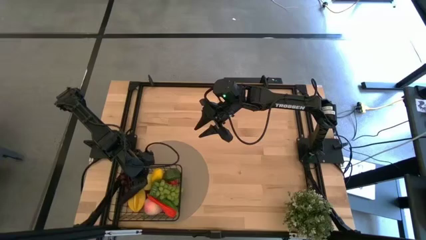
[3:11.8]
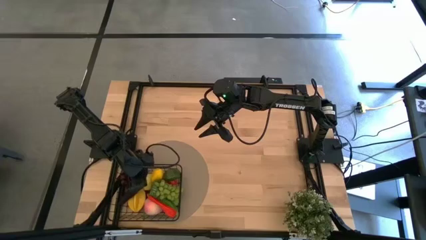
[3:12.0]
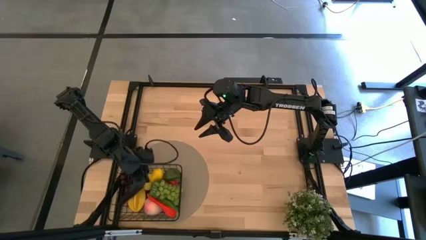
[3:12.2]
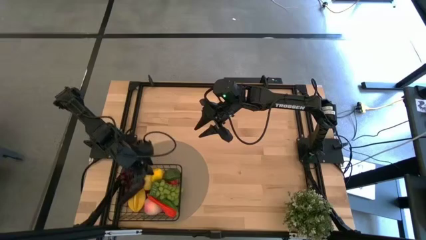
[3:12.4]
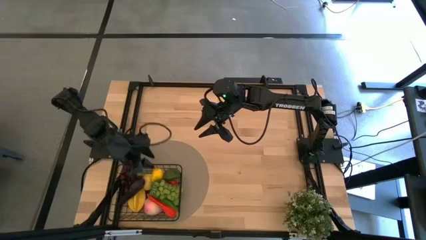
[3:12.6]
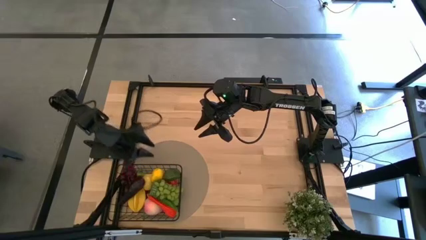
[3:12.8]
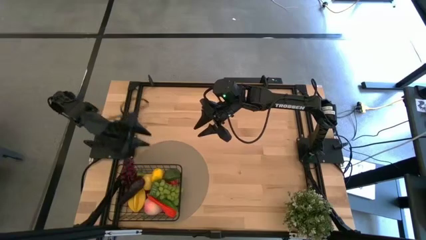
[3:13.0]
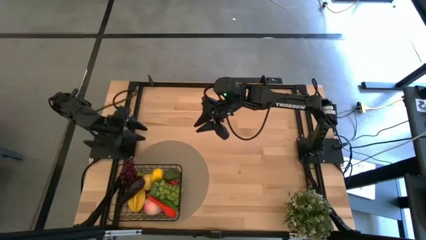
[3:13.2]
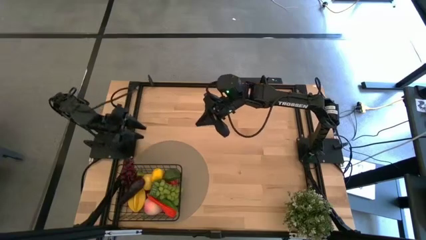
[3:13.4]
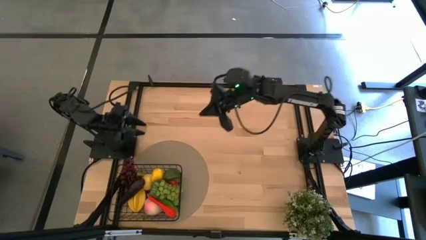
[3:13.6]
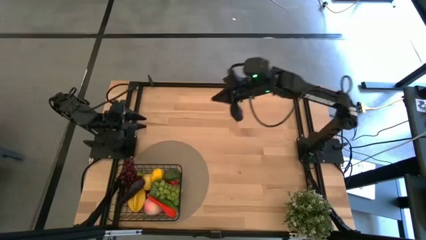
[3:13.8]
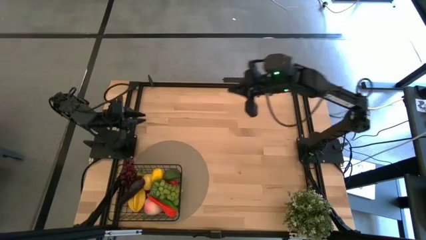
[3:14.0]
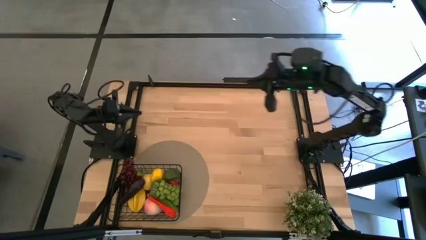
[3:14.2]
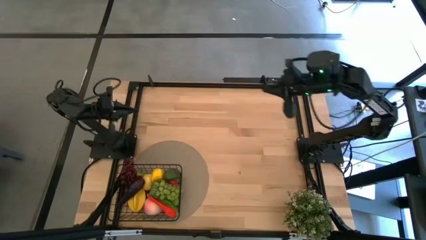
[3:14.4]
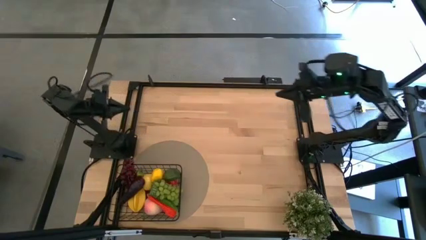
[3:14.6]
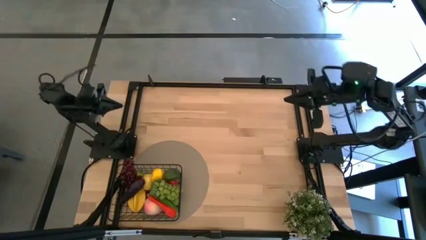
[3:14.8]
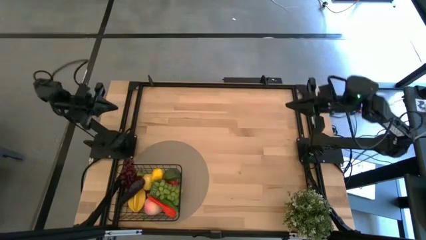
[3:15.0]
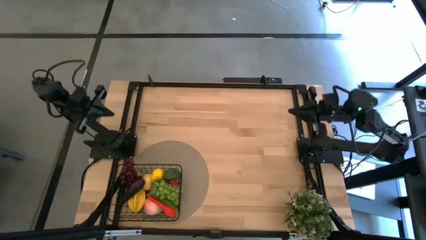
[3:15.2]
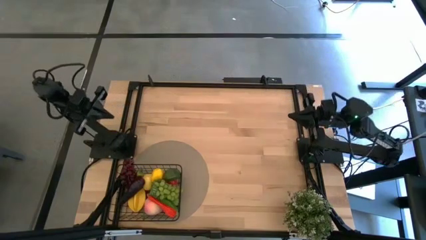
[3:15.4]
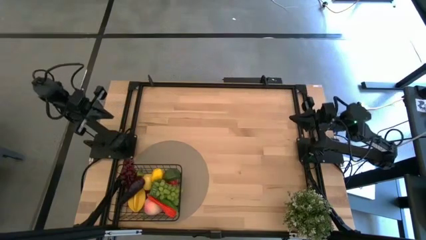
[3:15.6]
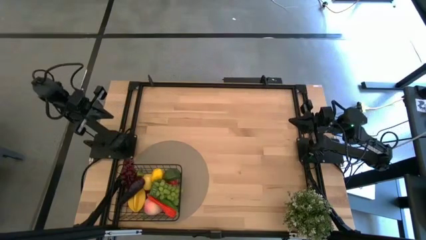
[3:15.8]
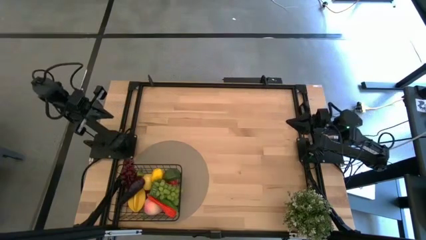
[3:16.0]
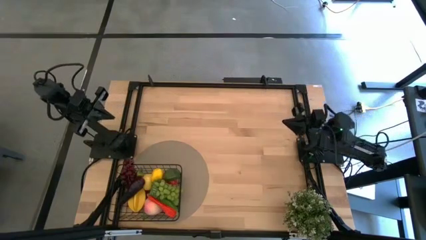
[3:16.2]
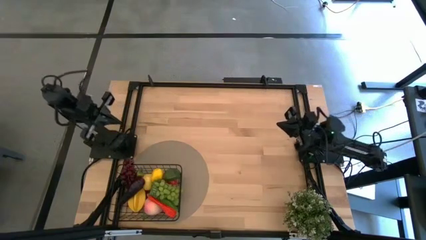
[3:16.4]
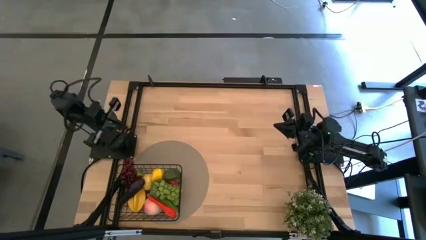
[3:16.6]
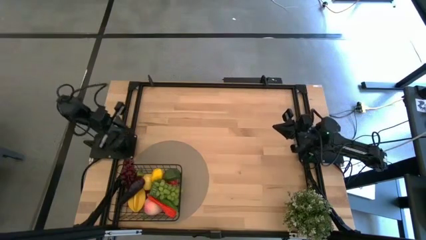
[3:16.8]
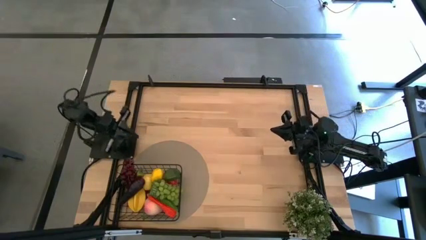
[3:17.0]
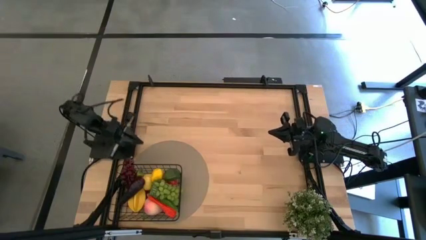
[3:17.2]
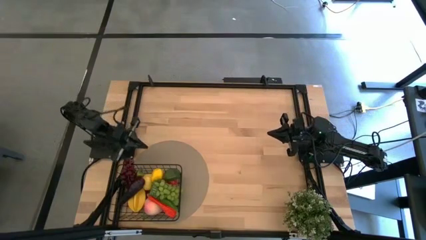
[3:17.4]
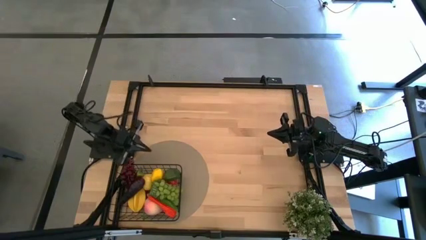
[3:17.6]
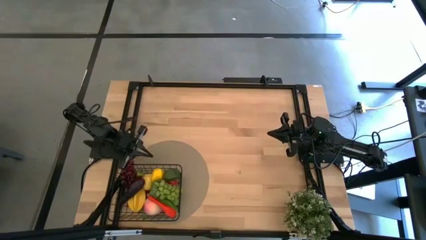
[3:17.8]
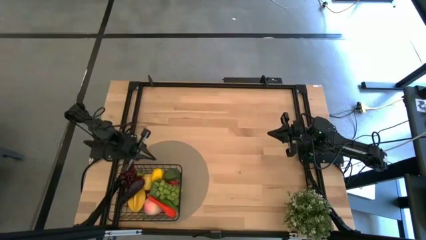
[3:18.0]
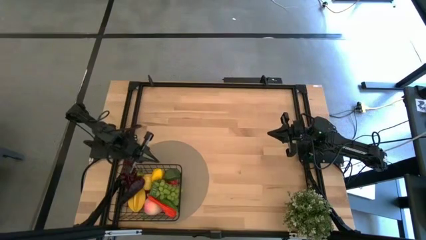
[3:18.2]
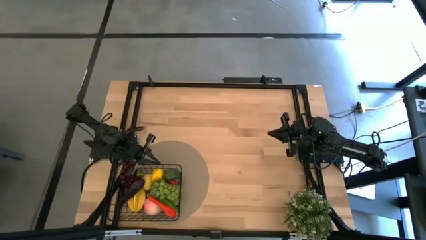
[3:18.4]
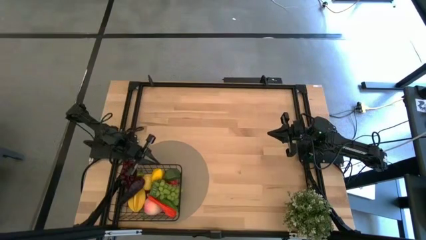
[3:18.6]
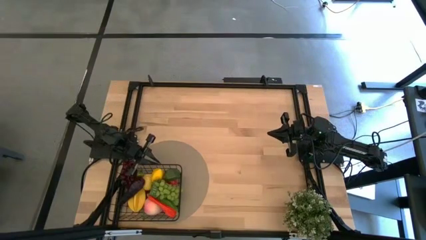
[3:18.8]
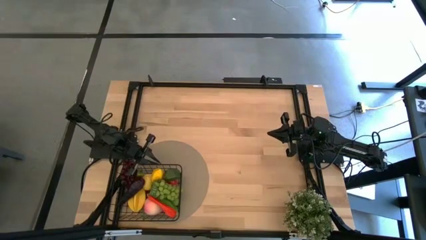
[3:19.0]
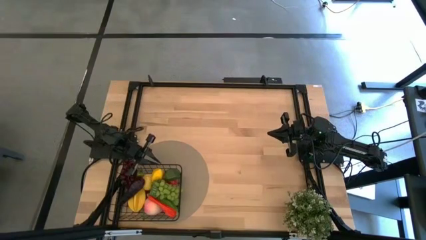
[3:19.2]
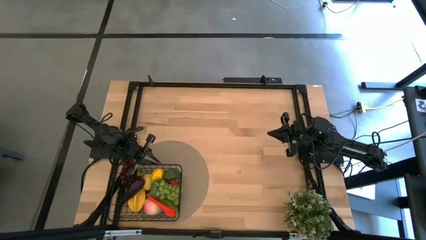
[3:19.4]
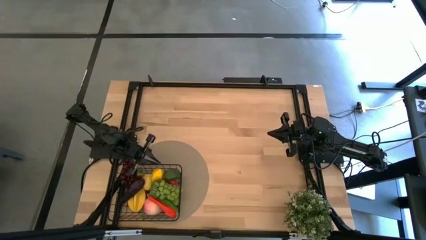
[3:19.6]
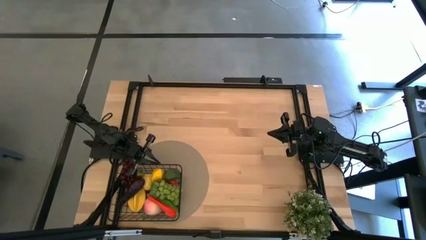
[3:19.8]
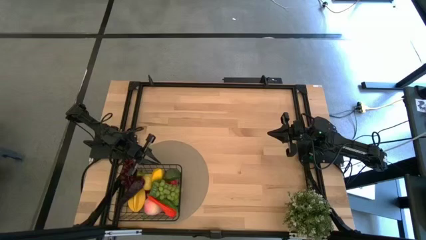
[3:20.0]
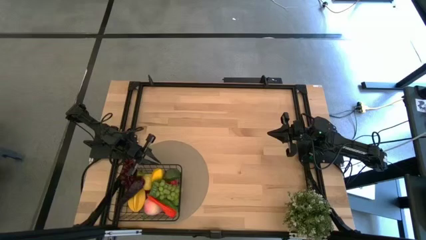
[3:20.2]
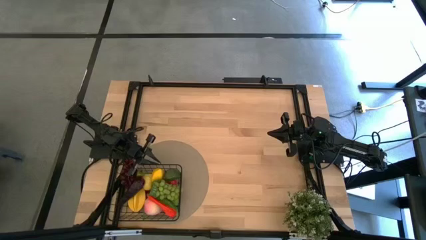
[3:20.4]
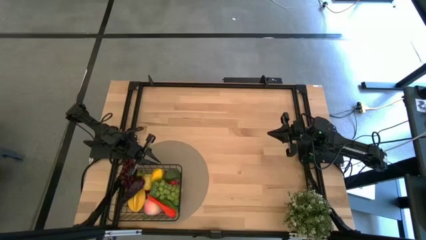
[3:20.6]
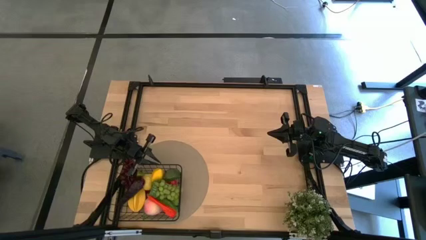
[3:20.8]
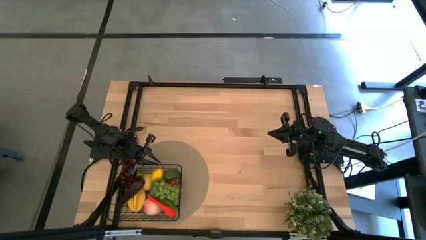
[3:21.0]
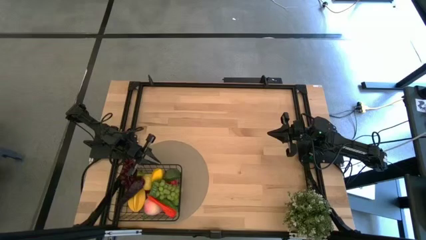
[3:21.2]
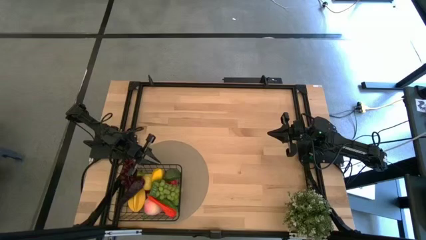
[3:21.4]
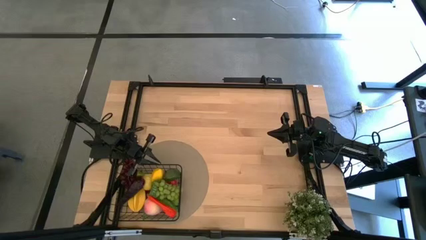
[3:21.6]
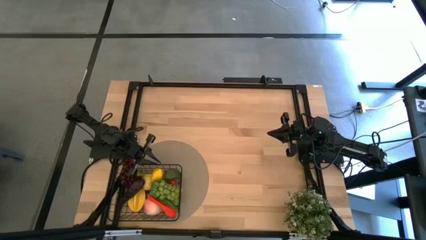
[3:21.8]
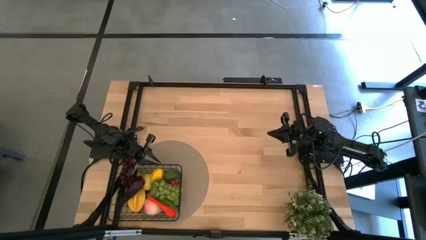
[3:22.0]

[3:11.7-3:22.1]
Task: Build produce basket
Return to Home Position
